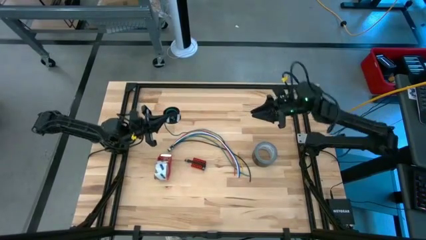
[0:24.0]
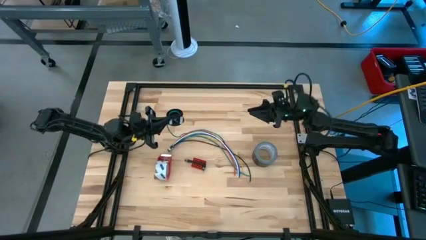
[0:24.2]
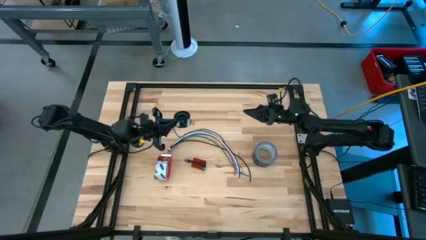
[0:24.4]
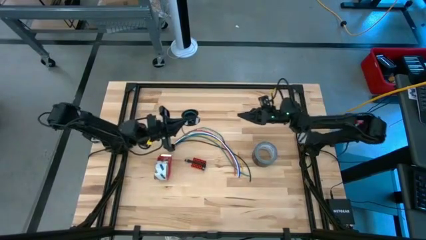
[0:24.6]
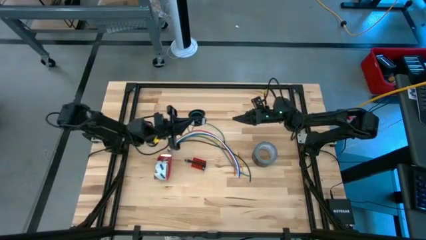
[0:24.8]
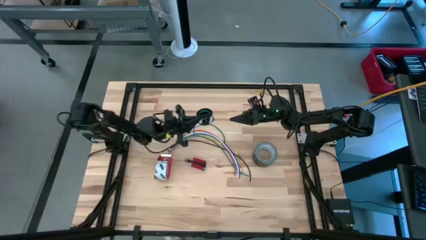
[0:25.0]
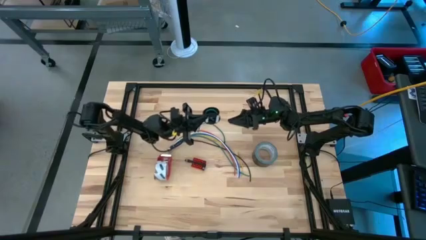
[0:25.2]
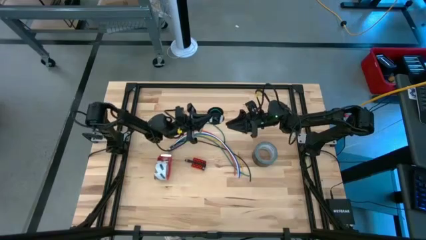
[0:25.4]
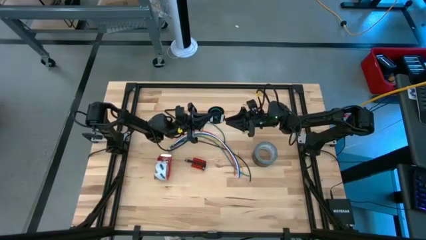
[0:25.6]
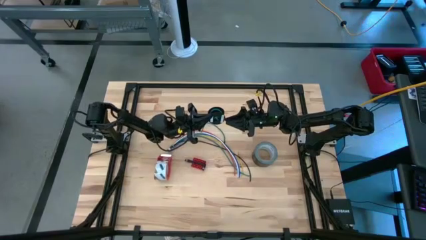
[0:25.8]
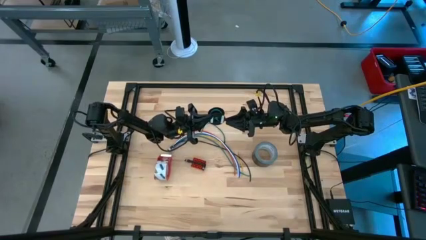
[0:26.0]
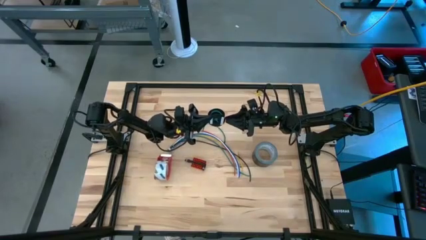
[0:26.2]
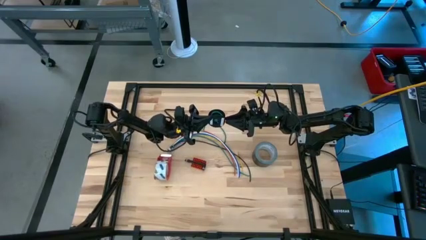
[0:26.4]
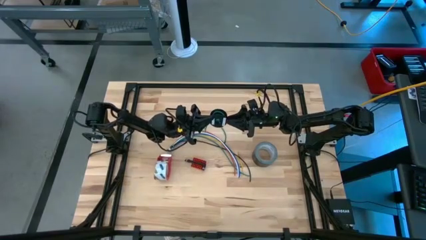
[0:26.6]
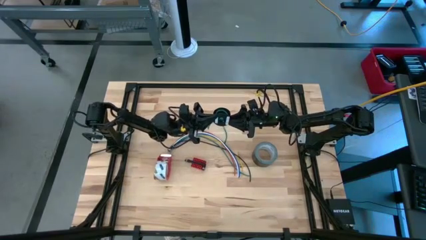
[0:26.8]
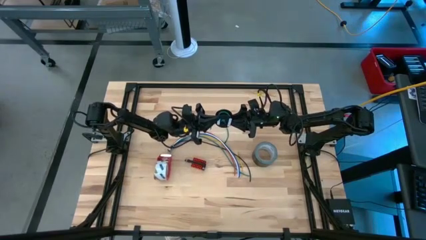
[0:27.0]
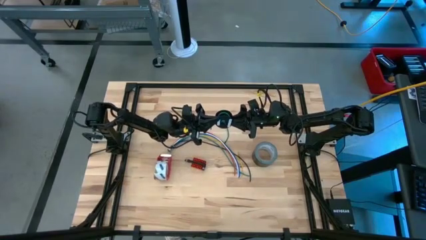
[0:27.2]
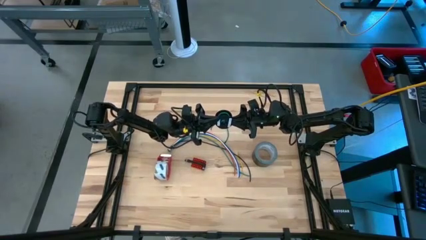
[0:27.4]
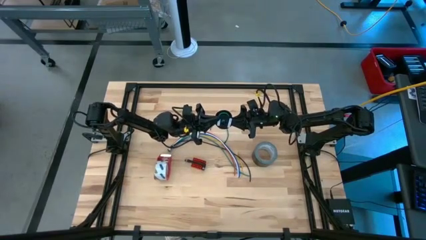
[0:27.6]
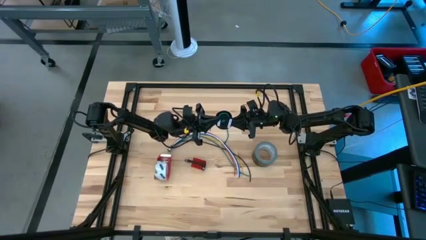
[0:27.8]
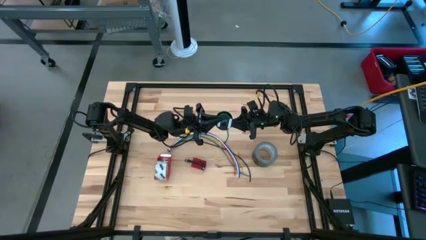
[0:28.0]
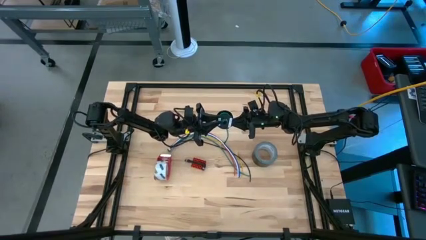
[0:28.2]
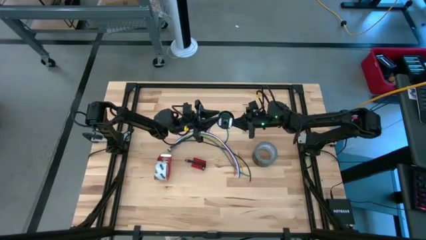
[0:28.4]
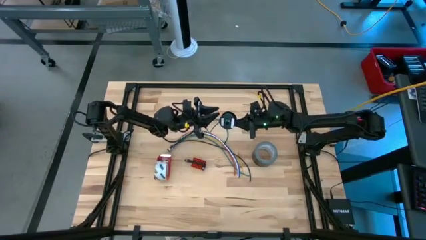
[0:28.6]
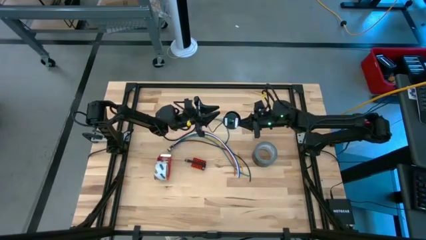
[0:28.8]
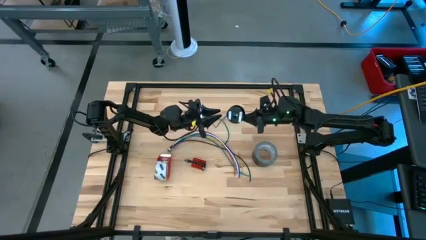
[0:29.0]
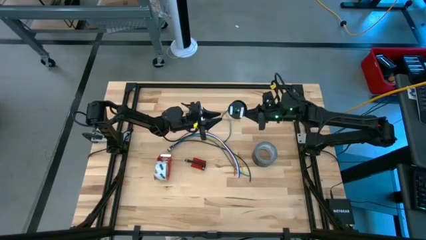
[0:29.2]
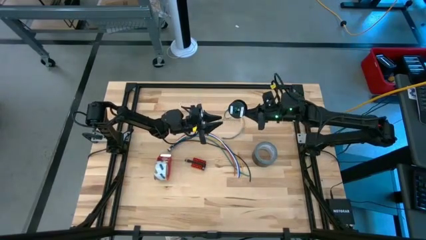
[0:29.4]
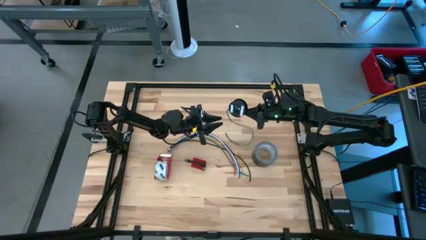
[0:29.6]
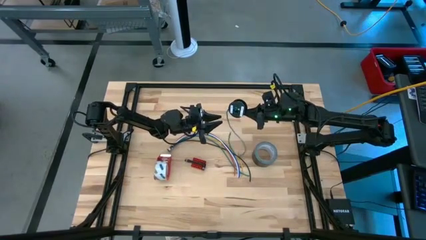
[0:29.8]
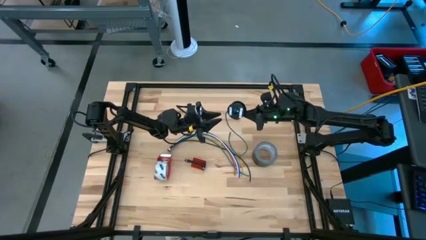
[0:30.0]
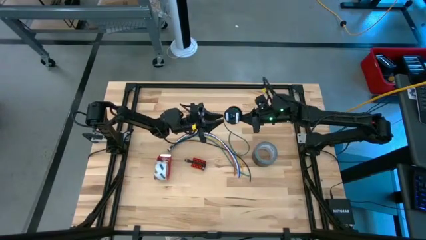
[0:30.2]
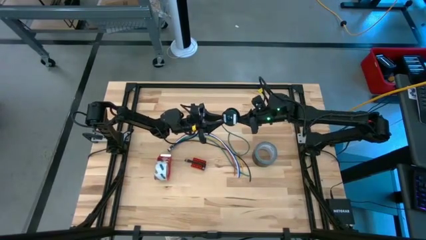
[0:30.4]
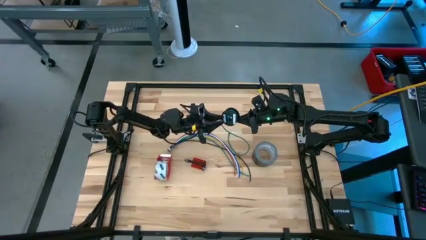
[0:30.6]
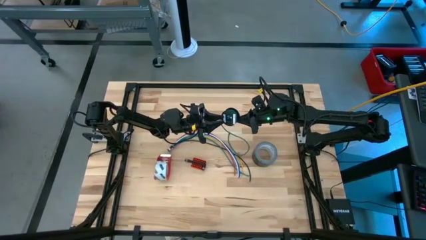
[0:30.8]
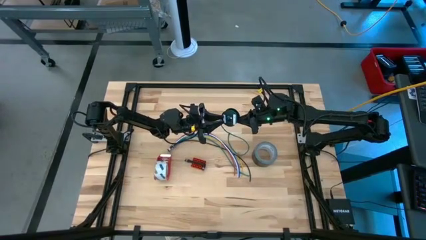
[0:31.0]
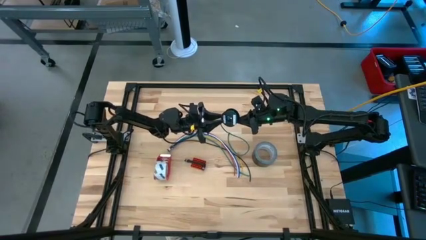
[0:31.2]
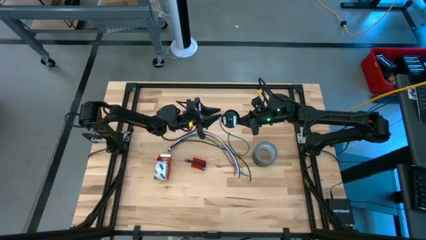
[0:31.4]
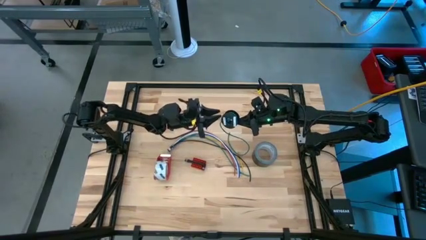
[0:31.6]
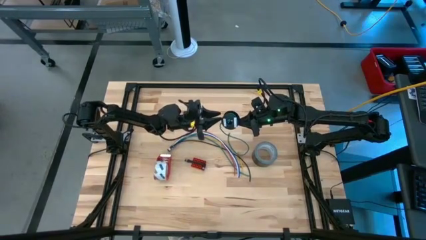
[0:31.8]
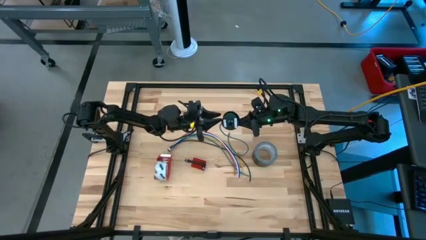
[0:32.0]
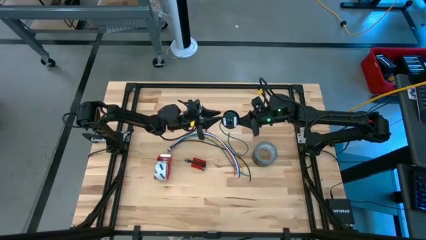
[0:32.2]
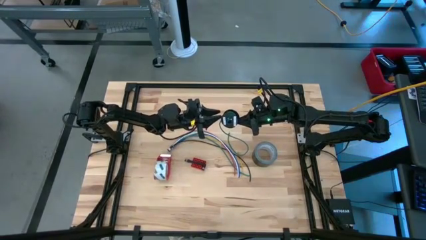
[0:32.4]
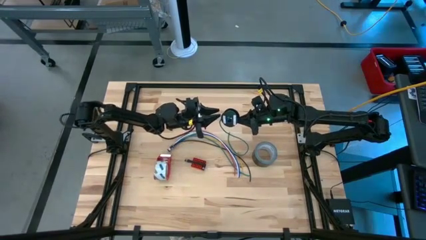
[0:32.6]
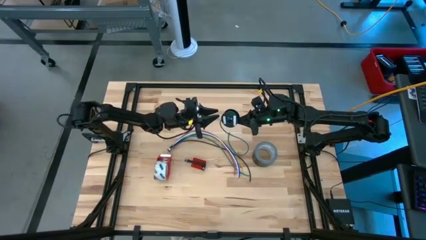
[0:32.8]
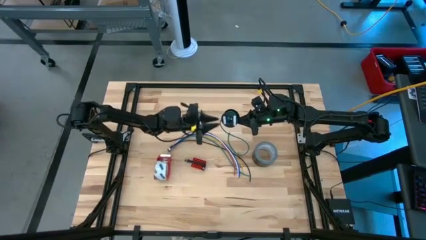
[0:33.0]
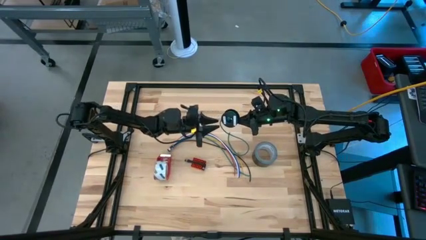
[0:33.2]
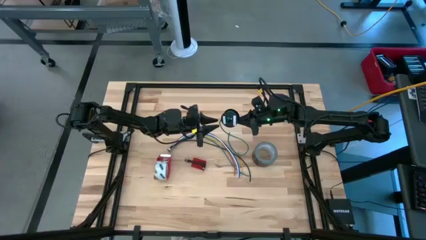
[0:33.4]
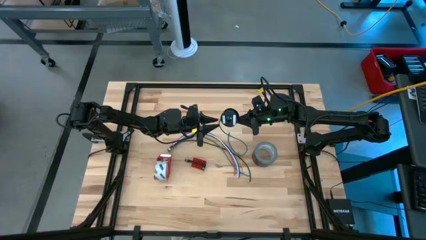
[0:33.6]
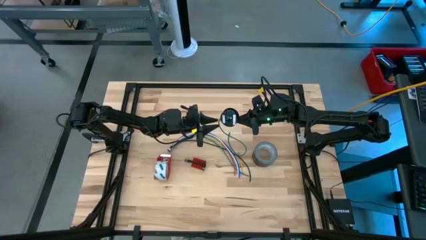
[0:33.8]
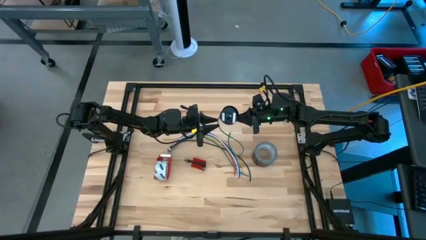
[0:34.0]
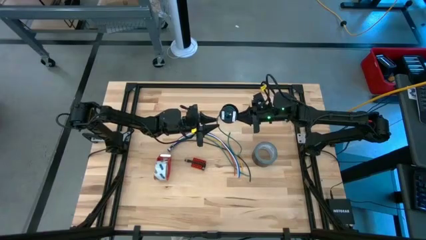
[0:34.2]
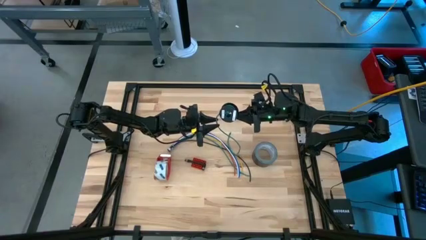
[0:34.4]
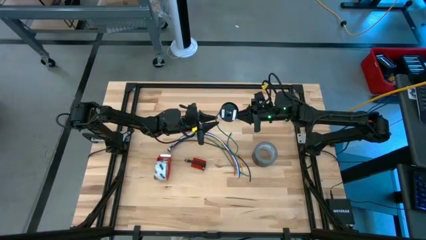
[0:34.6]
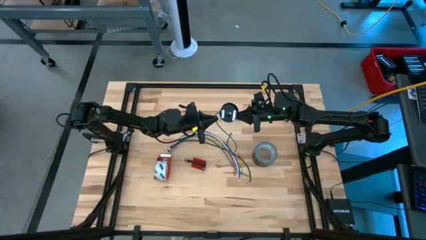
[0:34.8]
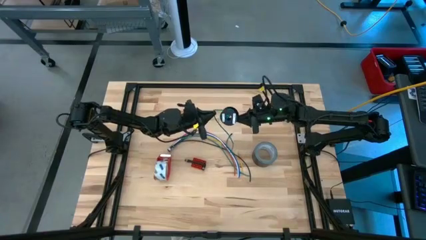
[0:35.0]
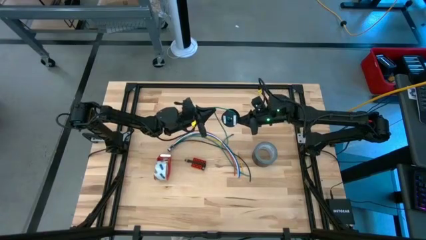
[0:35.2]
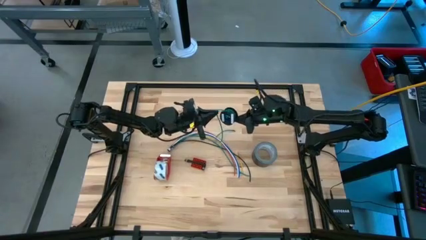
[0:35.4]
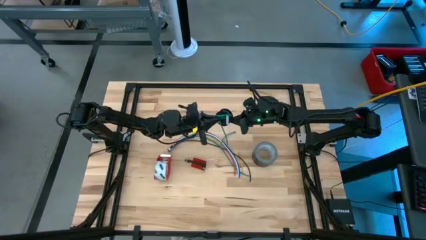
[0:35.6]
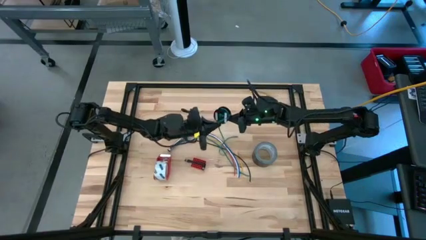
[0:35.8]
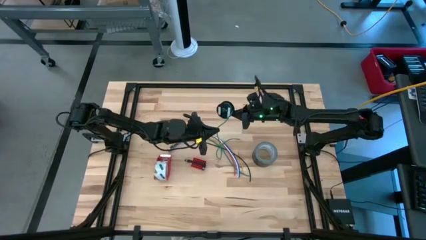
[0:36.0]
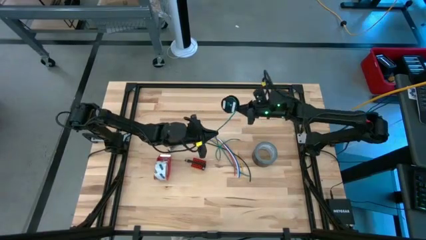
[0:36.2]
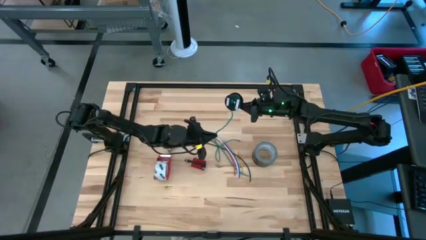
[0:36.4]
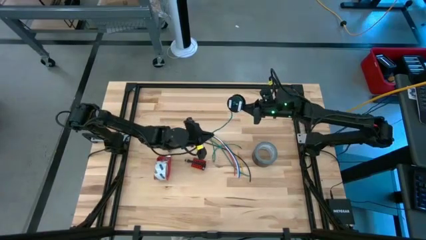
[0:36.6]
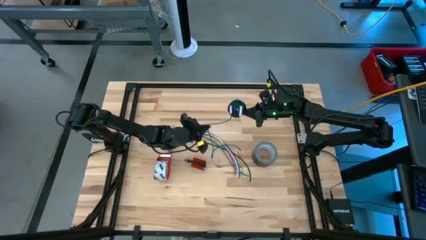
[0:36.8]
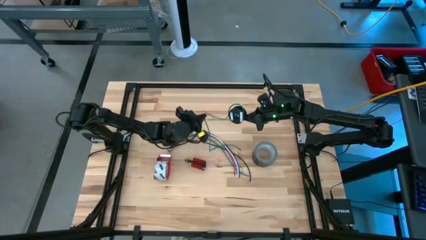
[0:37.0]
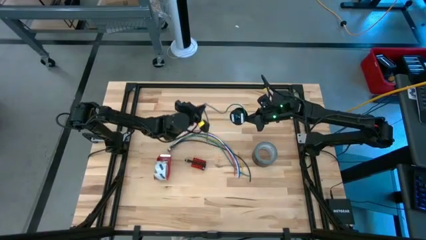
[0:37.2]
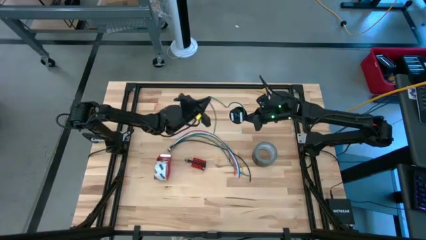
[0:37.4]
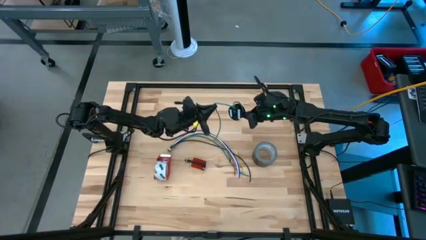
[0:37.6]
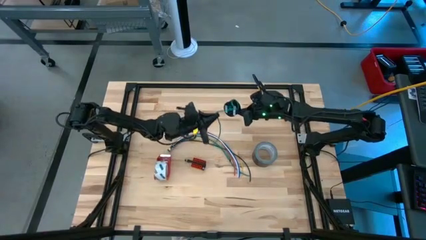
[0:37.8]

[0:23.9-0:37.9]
Task: Coil cords
Uncoil the green wire from the black spool

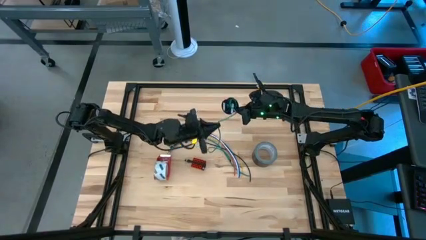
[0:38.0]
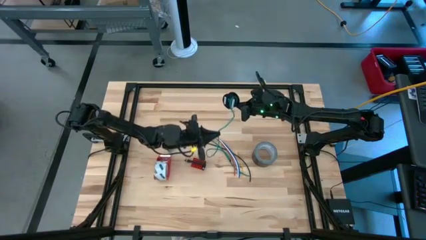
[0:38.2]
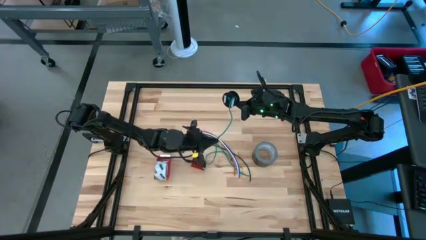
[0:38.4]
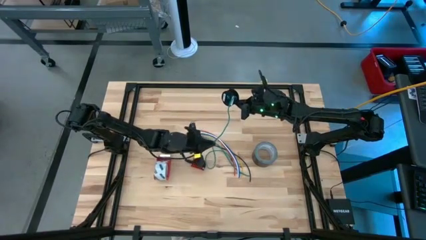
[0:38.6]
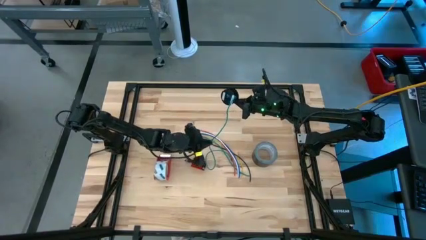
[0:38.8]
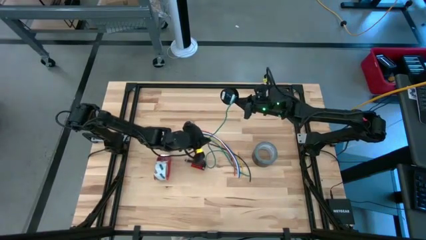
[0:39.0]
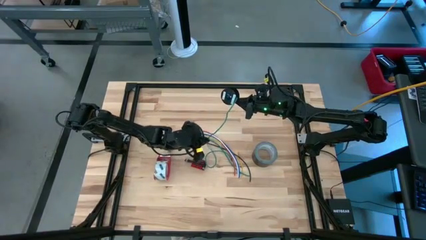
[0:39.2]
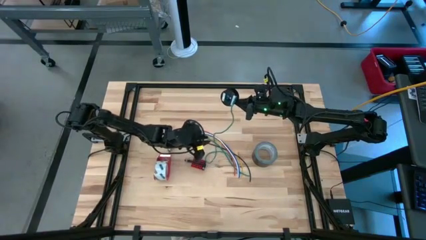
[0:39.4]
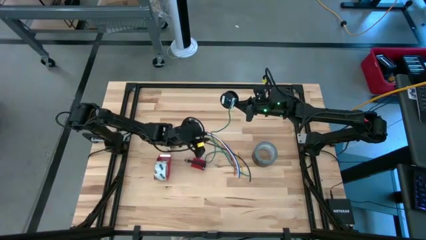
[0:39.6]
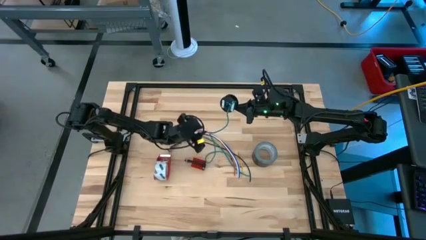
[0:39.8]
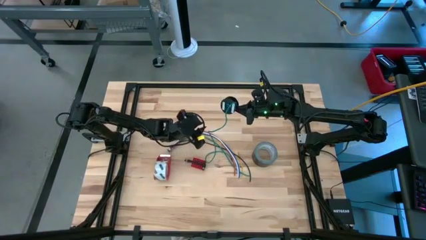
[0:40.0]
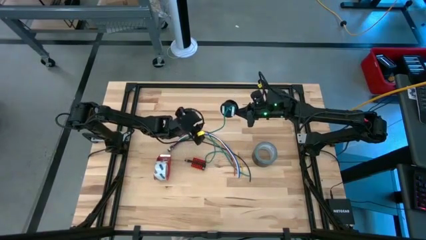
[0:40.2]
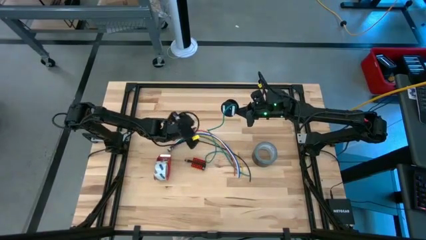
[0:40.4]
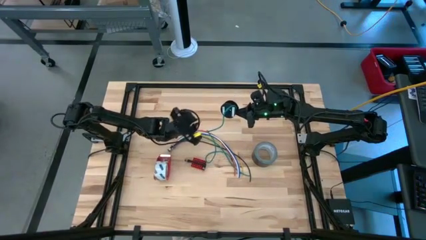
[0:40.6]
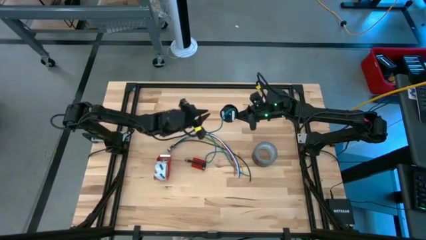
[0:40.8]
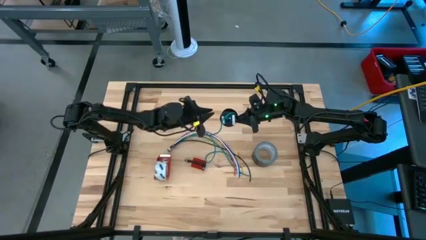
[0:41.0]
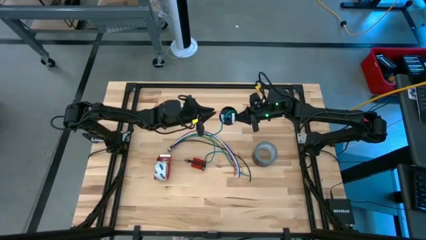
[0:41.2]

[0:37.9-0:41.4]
Uncoil the green wire from the black spool
